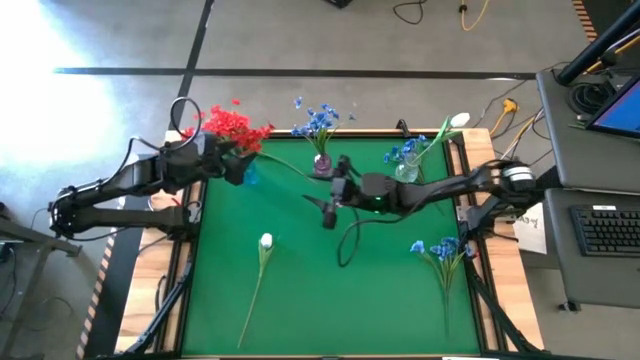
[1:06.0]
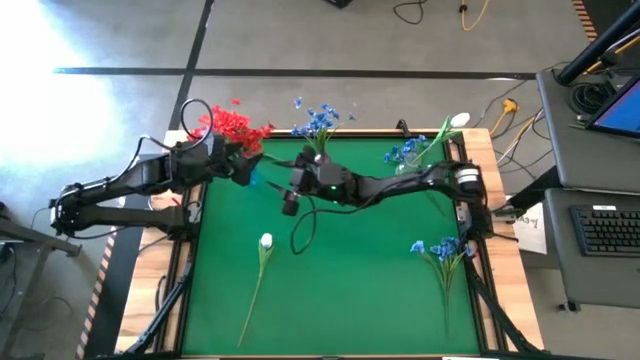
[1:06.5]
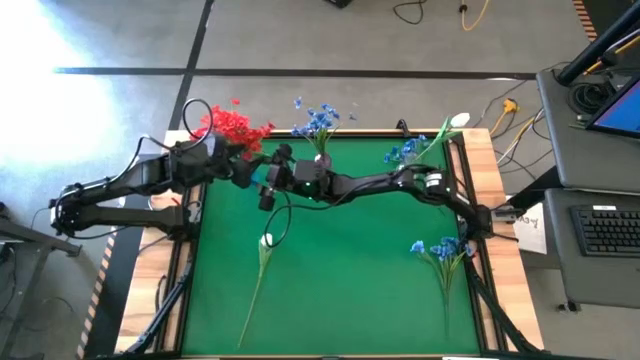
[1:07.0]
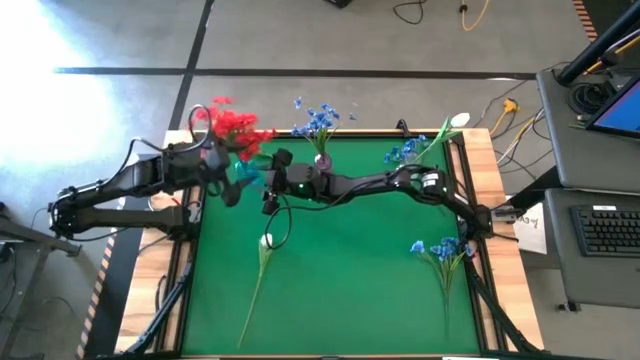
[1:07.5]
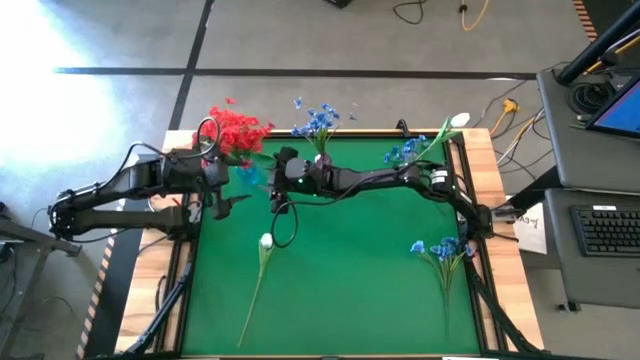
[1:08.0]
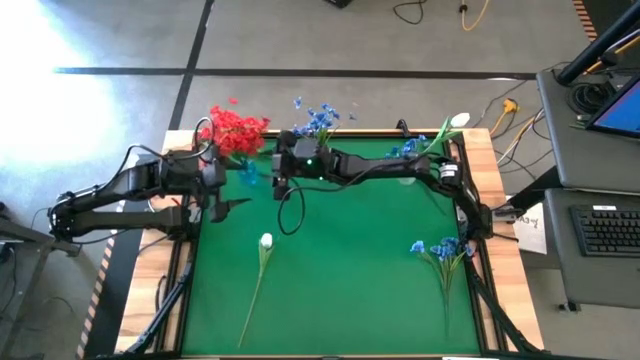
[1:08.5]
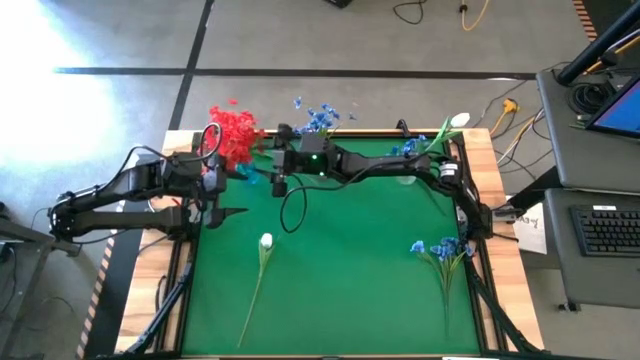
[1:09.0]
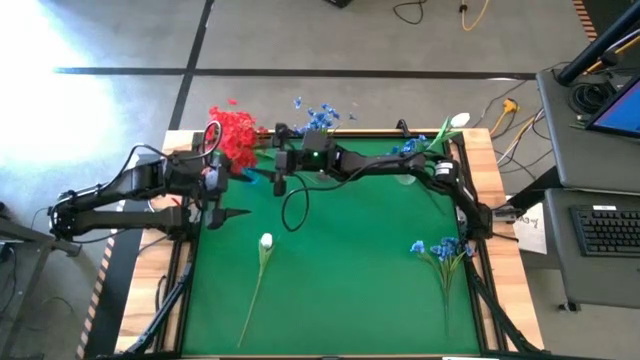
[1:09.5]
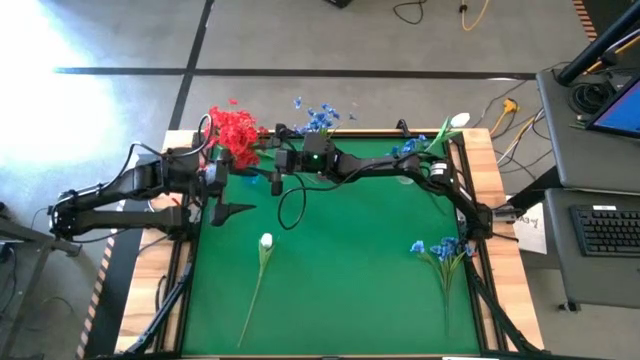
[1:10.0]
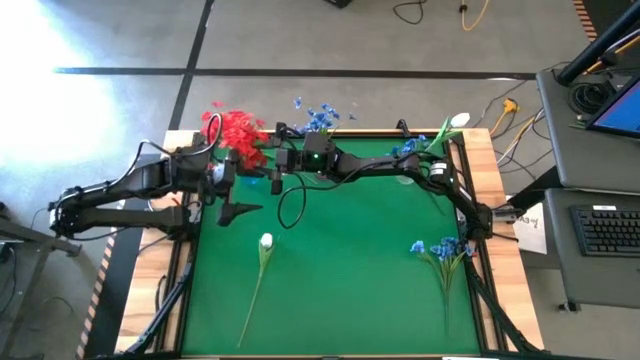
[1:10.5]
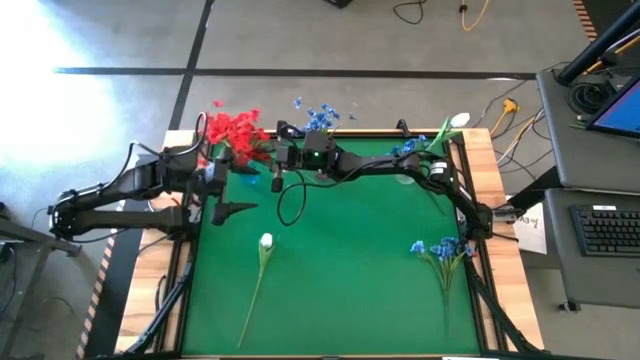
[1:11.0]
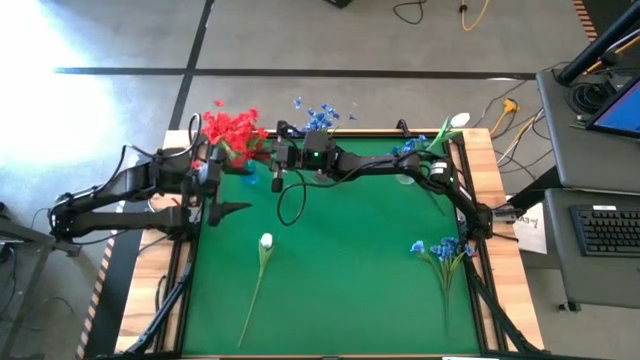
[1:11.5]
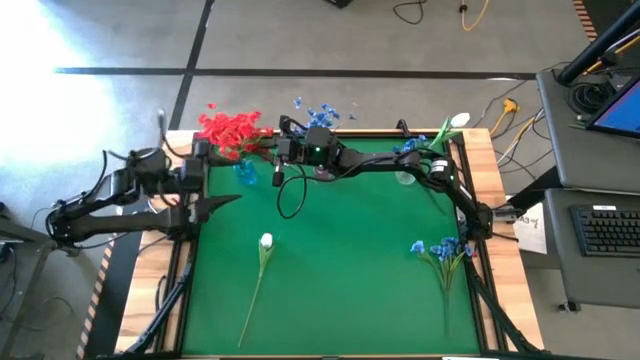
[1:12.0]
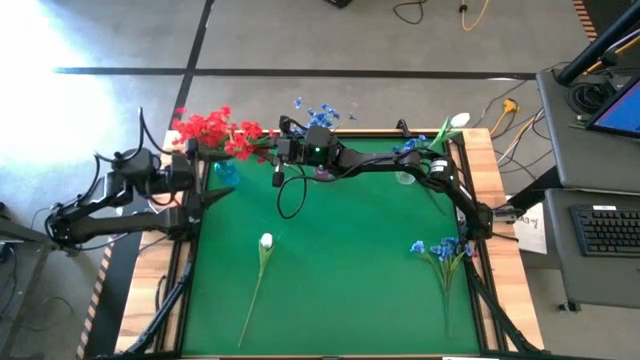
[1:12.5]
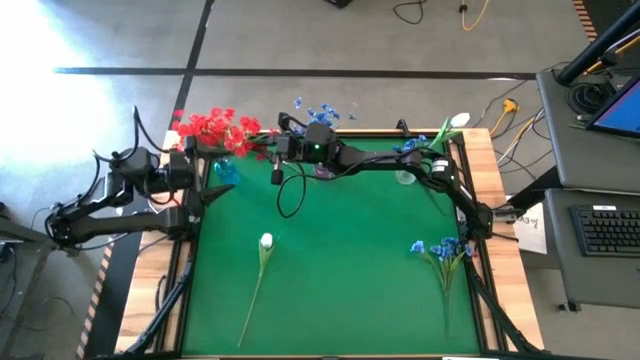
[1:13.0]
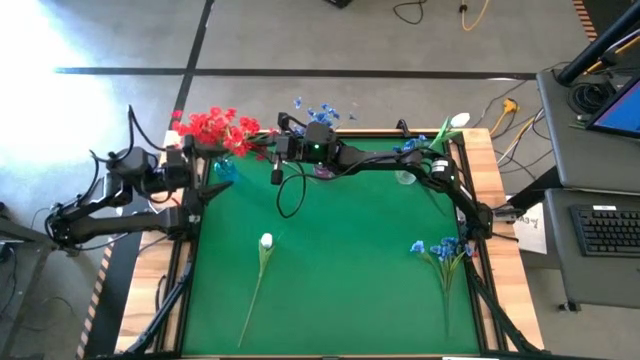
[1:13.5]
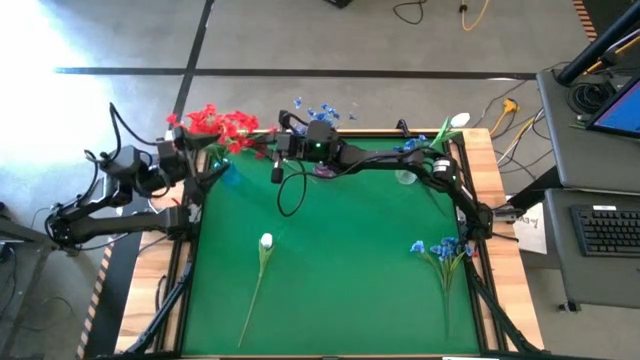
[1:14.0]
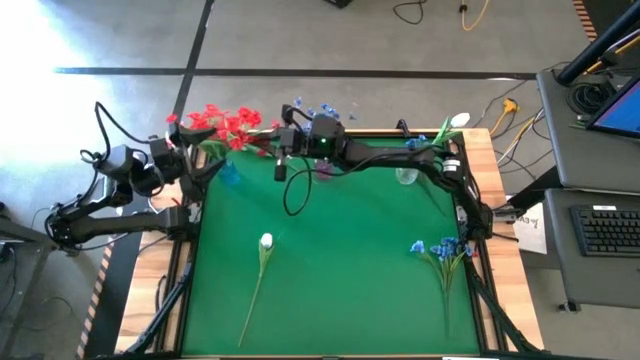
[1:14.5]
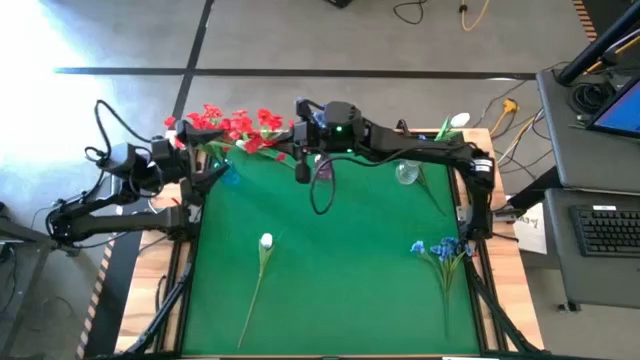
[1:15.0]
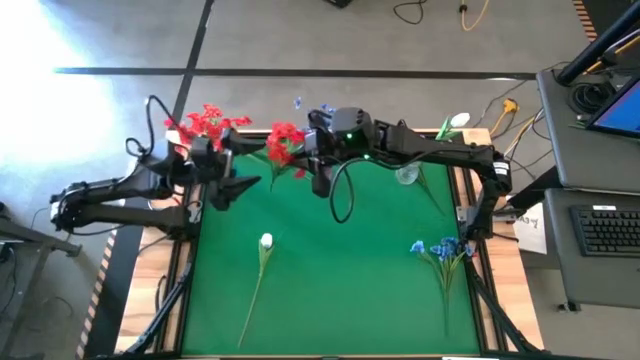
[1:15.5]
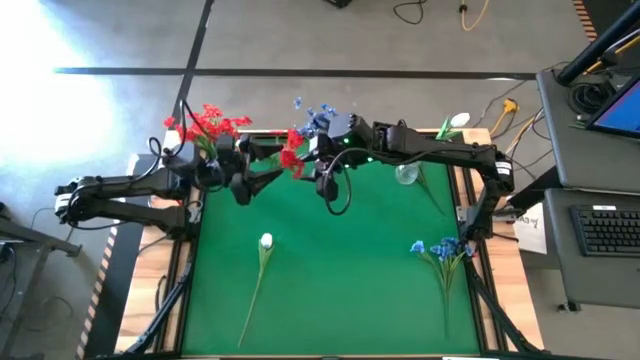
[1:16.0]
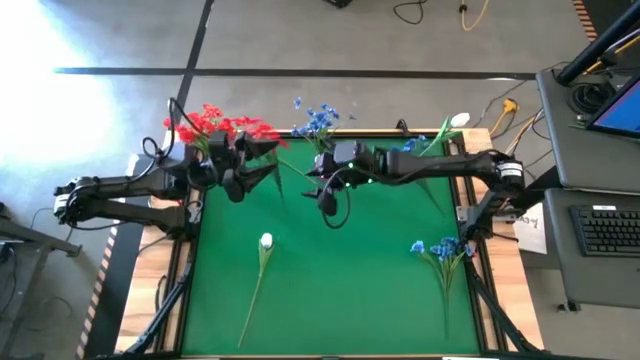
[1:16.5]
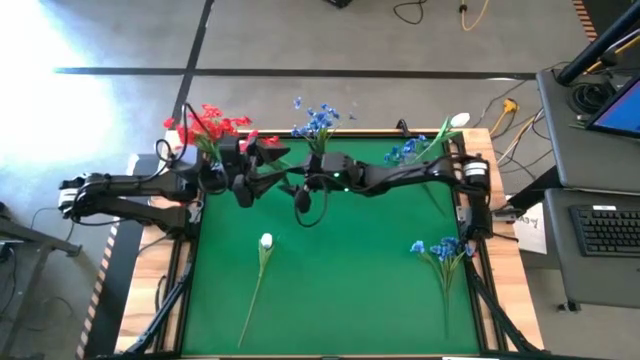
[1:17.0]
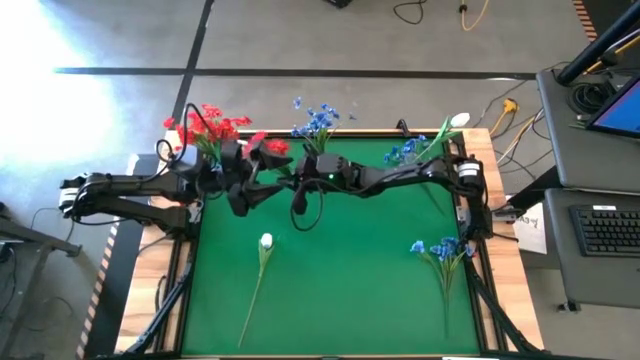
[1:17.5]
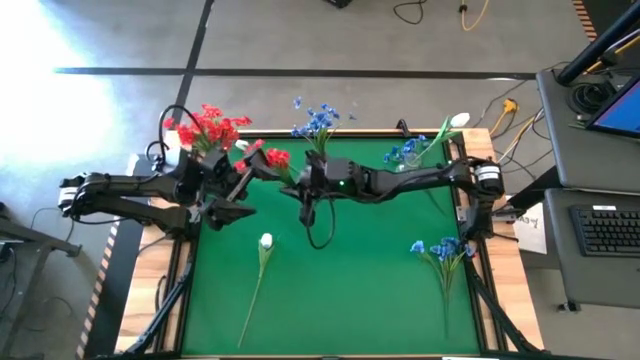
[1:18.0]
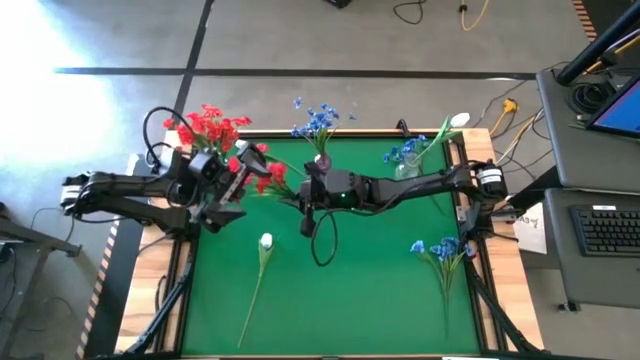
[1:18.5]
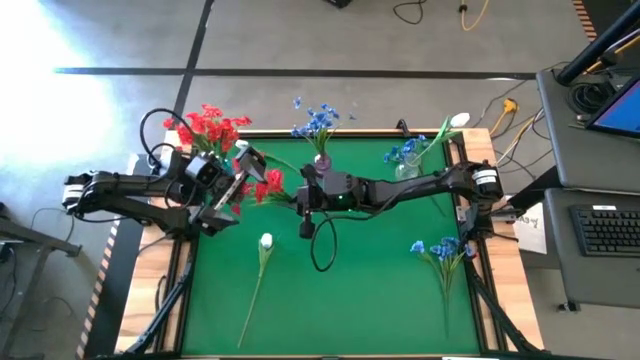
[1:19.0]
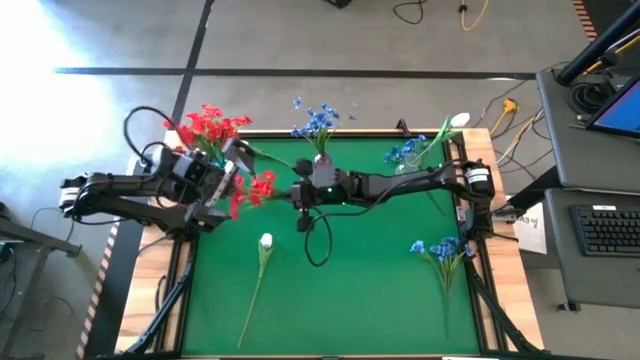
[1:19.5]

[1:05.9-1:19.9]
Task: Sort flowers into vase by color
Put the red flowers into the blue vase

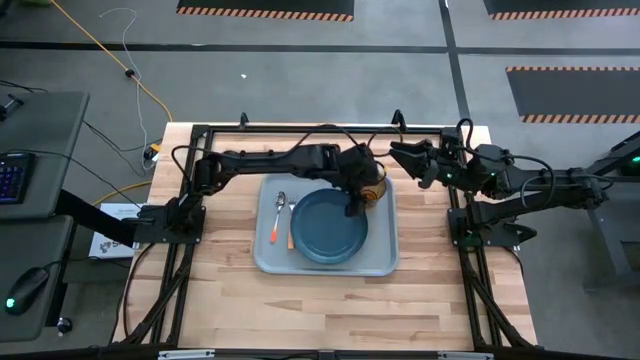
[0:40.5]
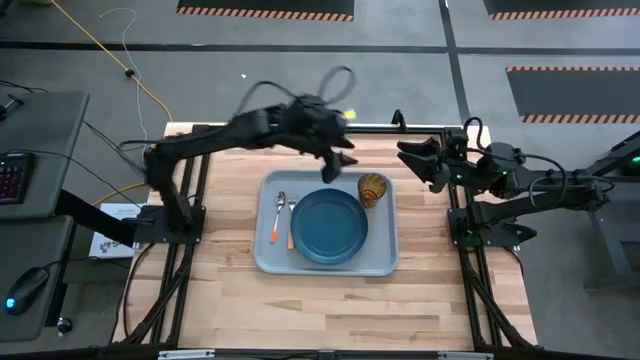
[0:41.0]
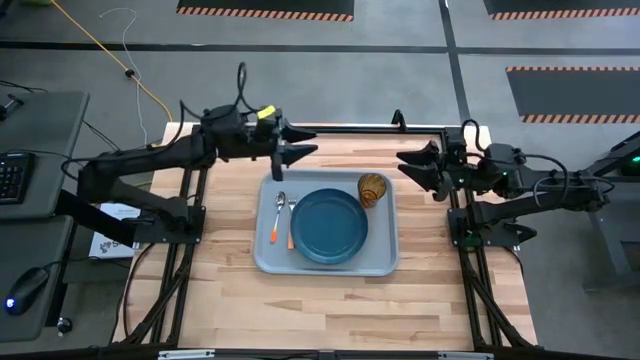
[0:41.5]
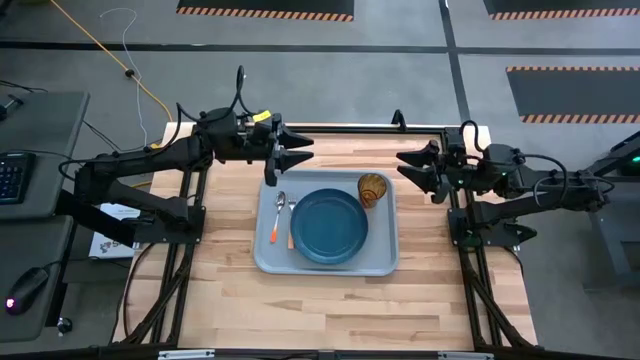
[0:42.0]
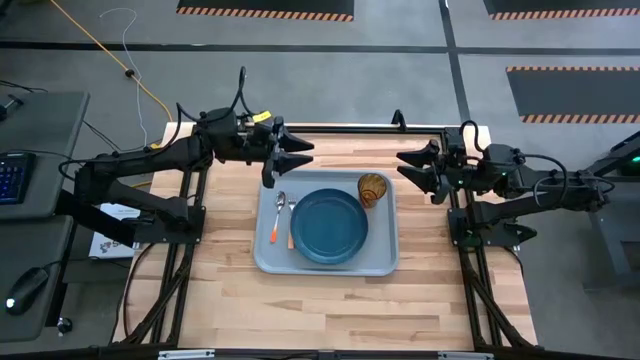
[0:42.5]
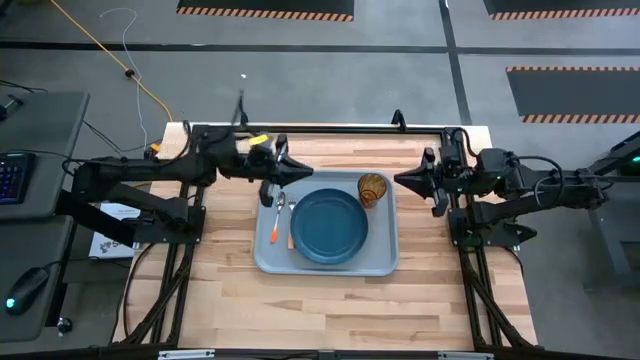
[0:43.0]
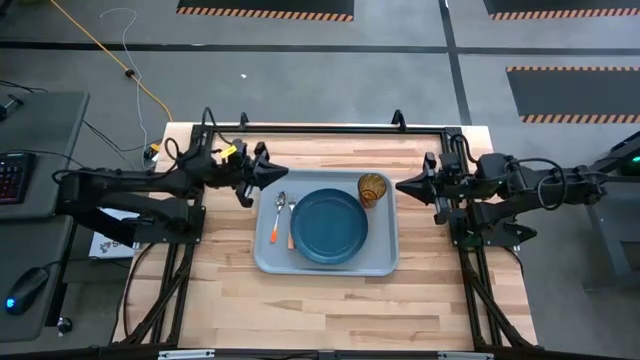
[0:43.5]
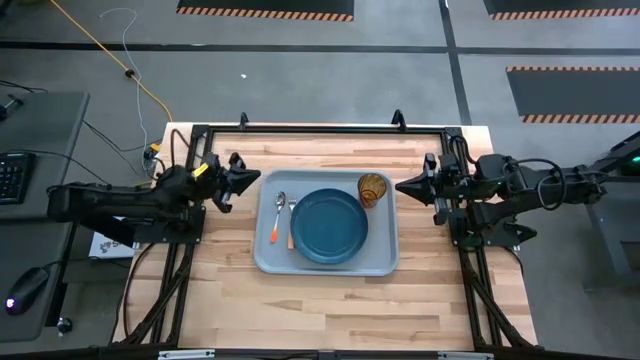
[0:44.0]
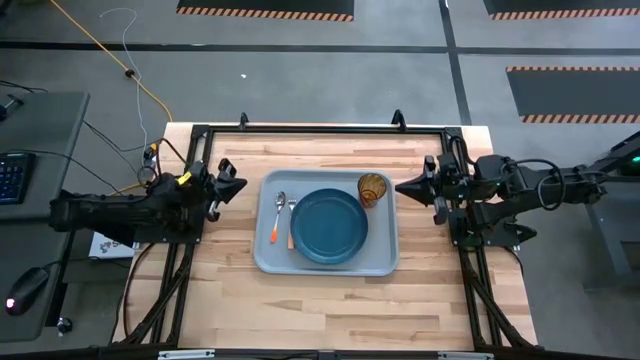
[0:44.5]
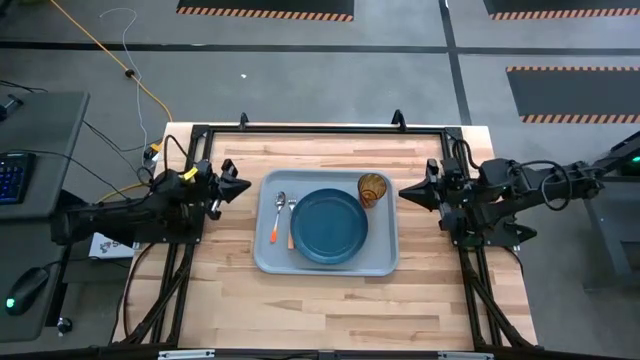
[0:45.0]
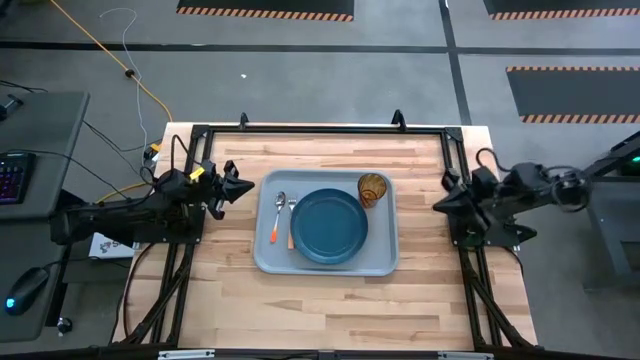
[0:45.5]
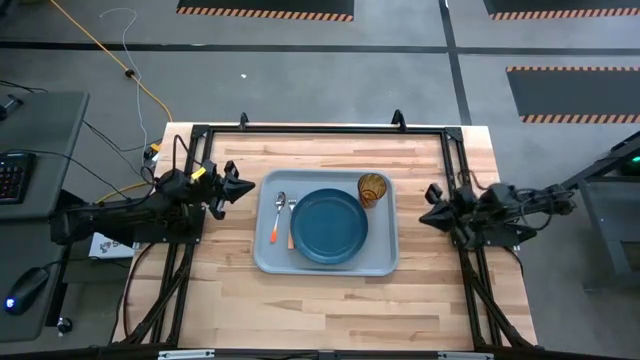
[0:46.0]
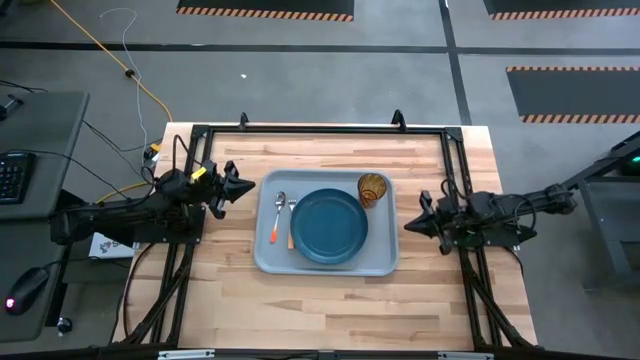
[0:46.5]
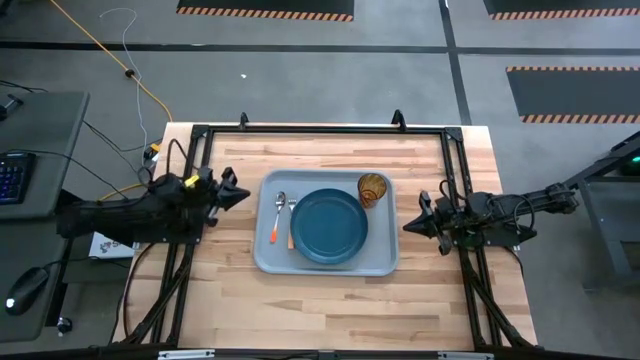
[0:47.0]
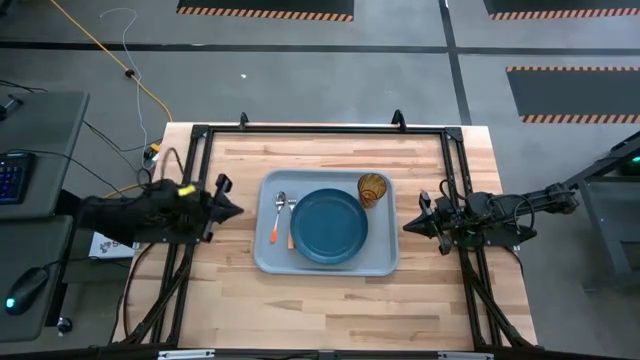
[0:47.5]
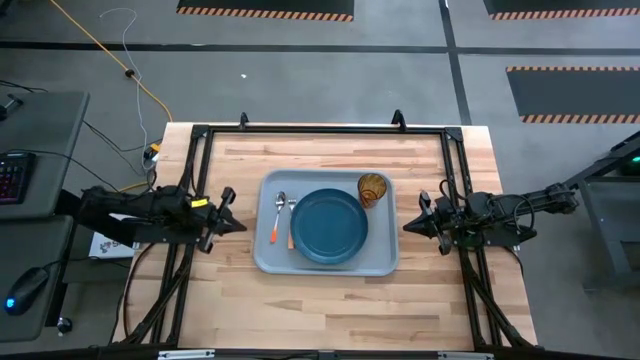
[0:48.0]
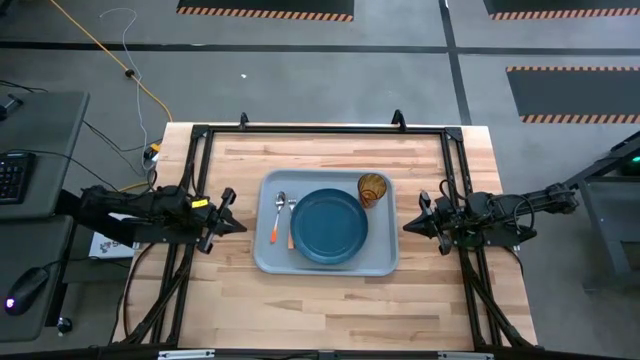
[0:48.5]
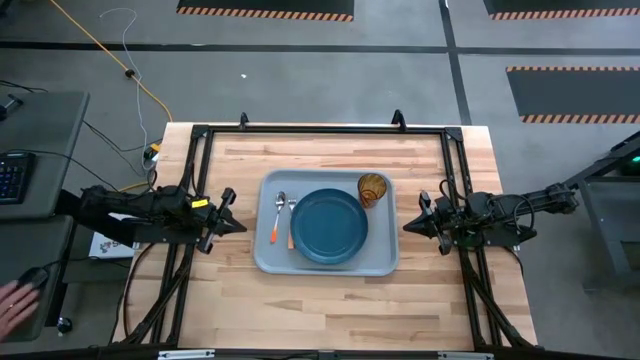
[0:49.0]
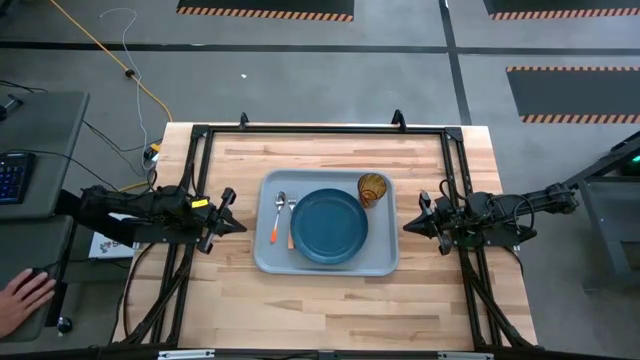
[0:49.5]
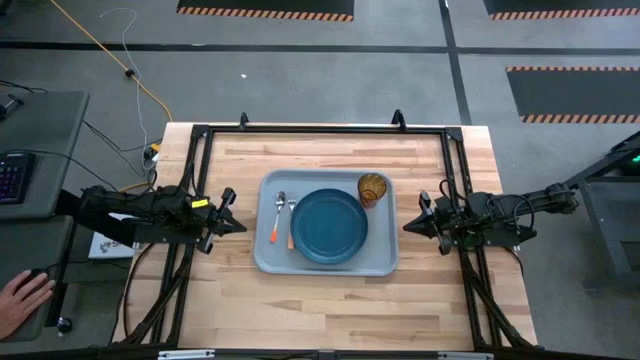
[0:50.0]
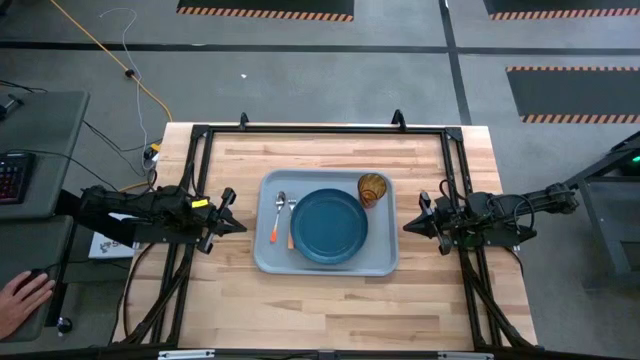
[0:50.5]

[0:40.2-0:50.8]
Task: Pick and place plate/cup/fork/spoon on tray
Return to Home Position
